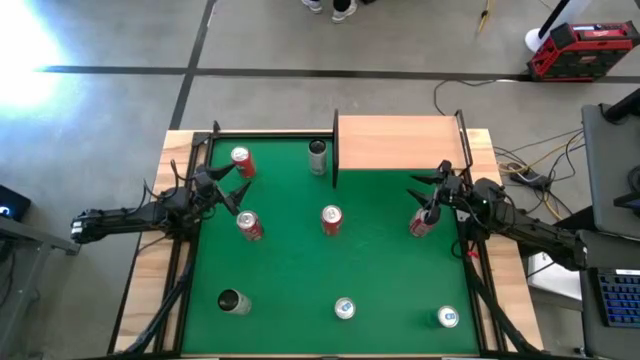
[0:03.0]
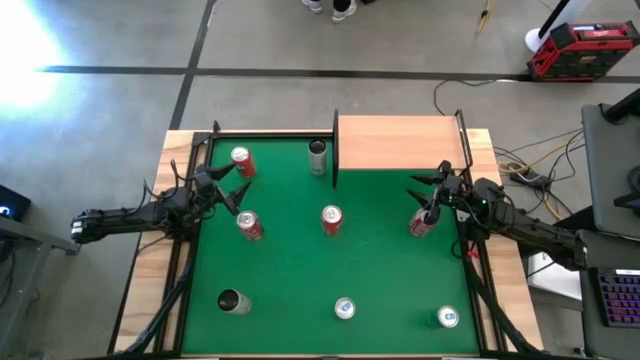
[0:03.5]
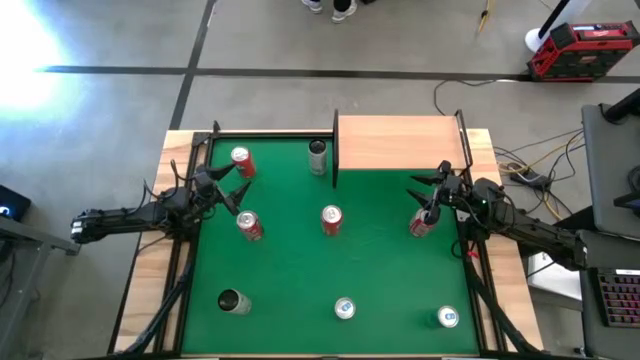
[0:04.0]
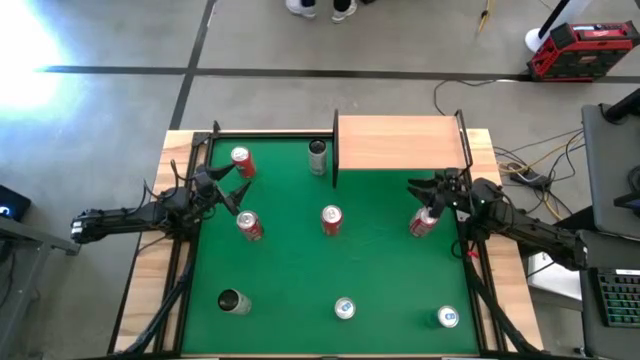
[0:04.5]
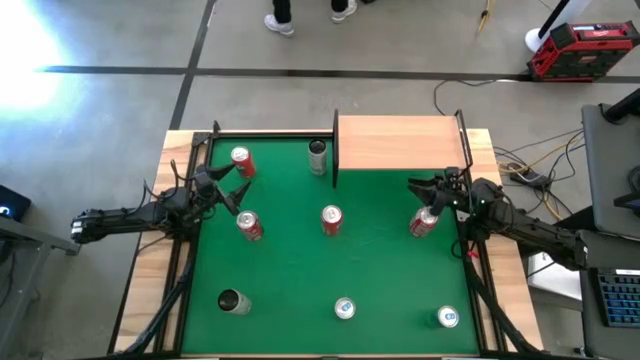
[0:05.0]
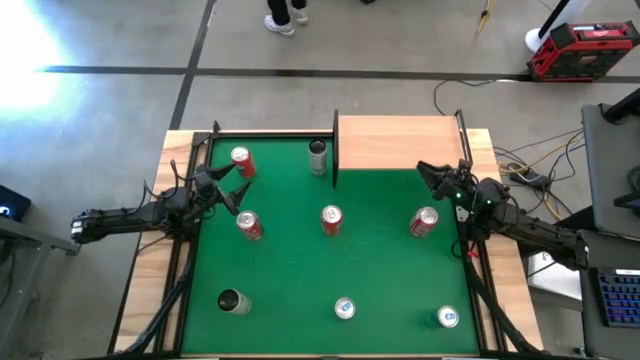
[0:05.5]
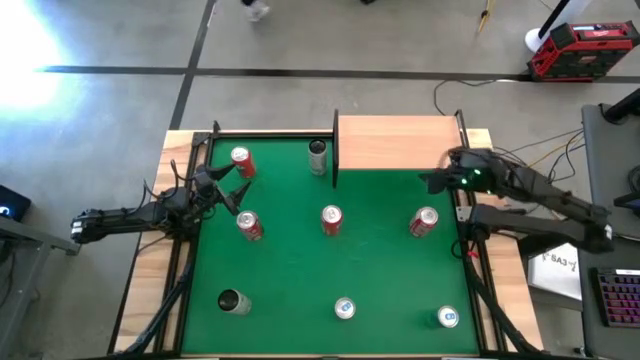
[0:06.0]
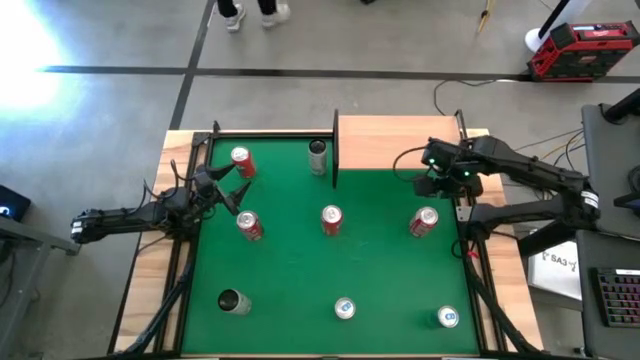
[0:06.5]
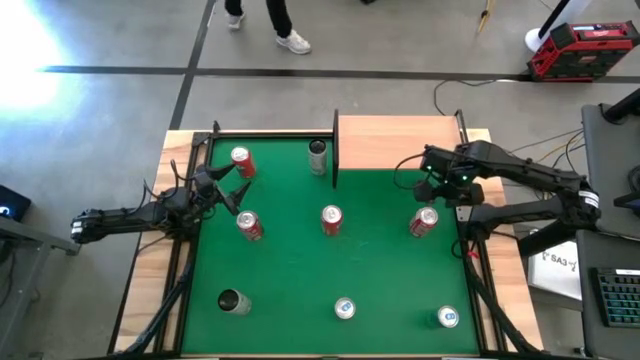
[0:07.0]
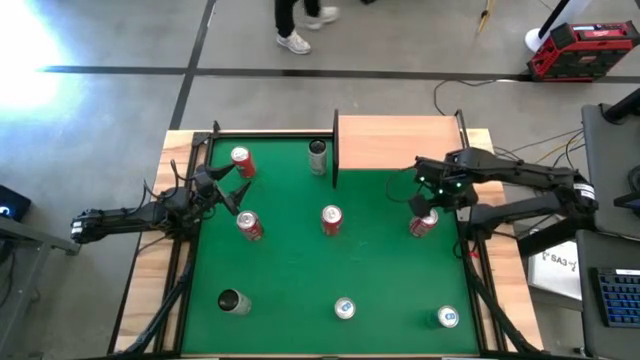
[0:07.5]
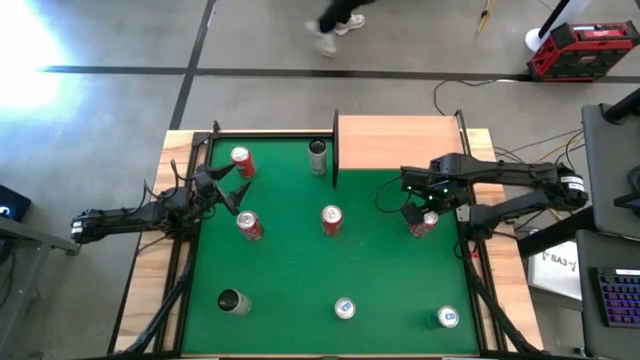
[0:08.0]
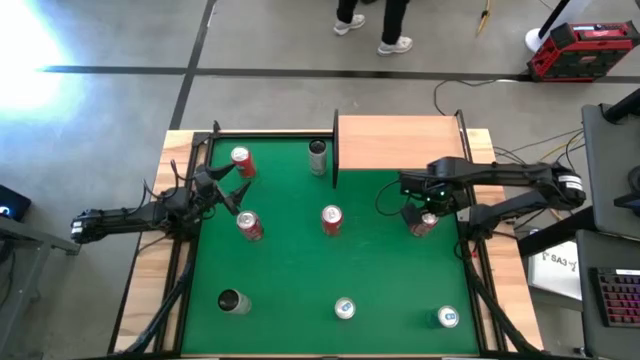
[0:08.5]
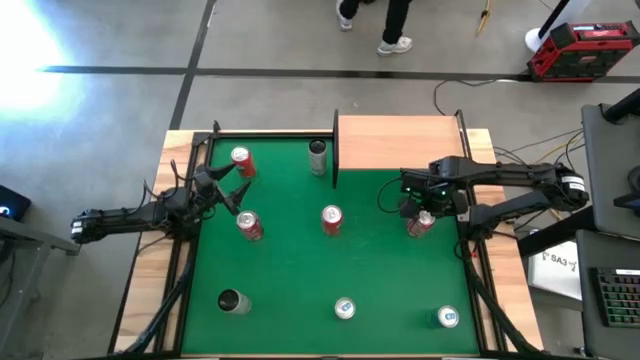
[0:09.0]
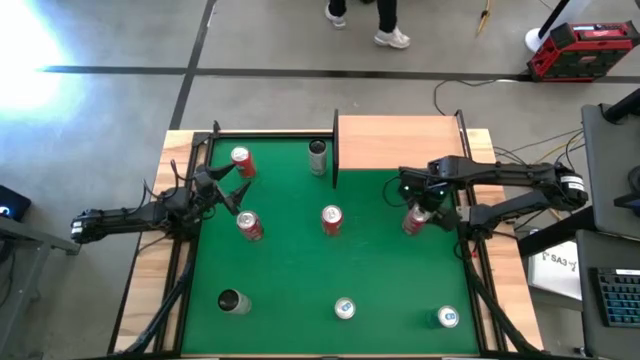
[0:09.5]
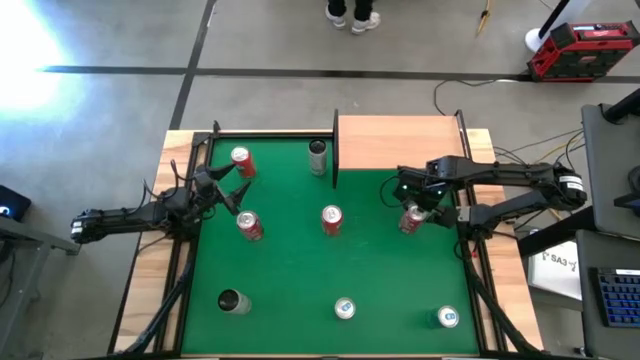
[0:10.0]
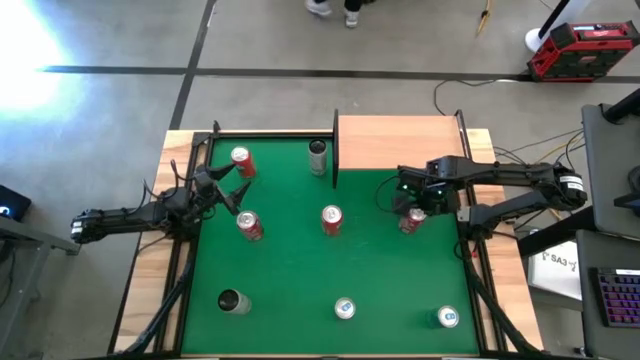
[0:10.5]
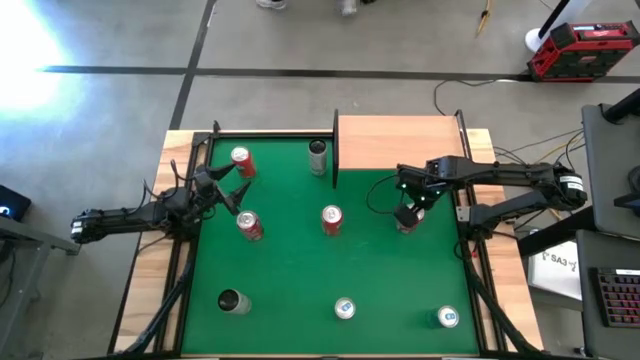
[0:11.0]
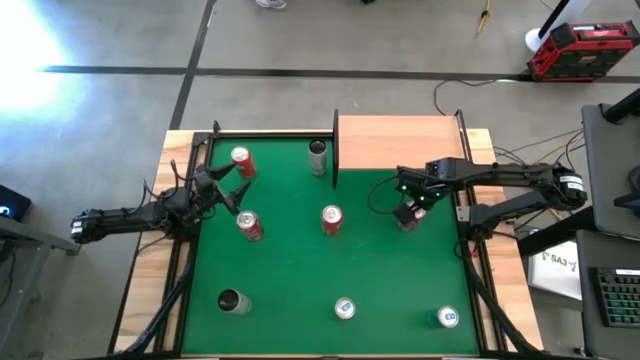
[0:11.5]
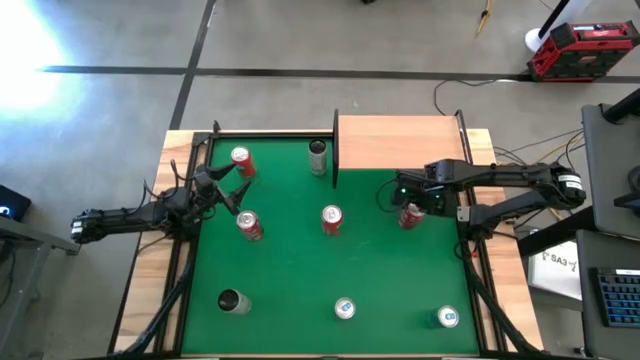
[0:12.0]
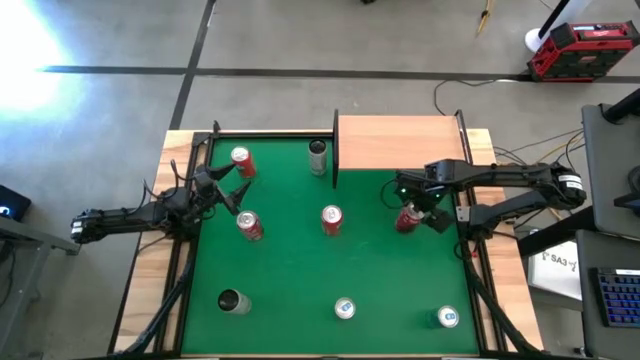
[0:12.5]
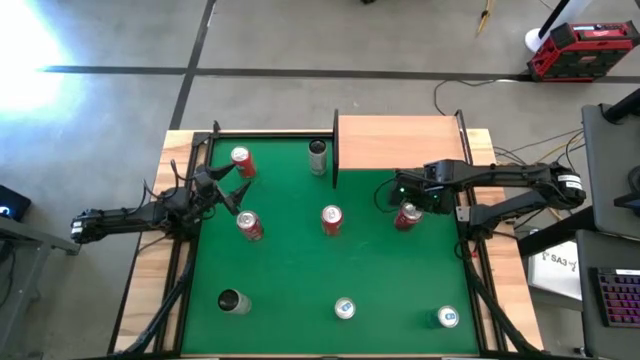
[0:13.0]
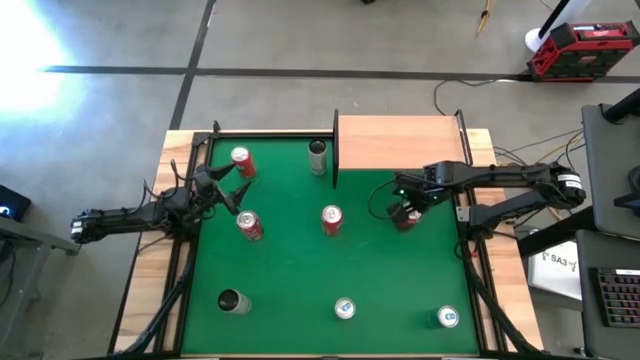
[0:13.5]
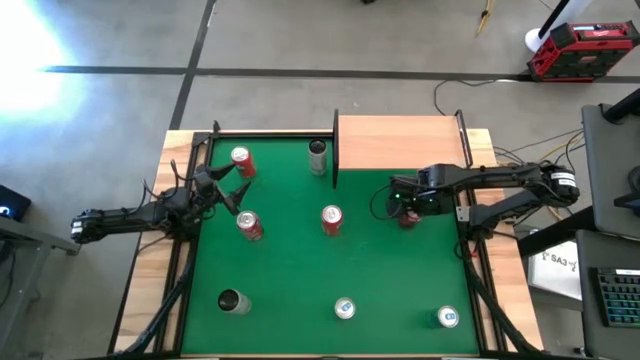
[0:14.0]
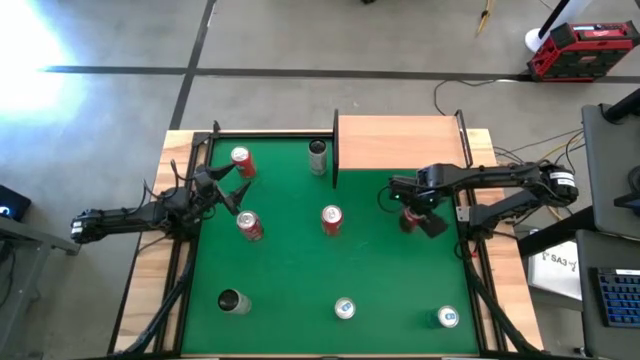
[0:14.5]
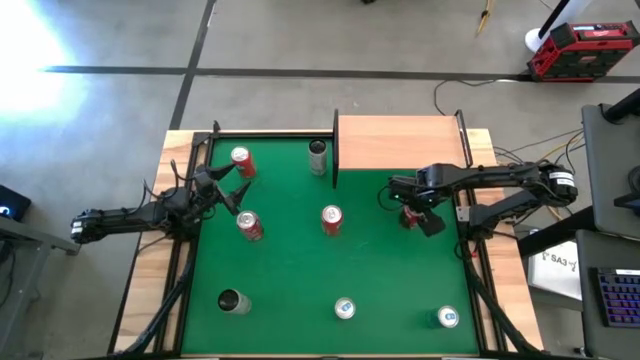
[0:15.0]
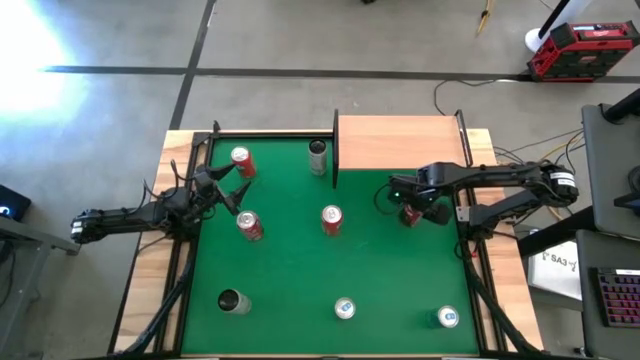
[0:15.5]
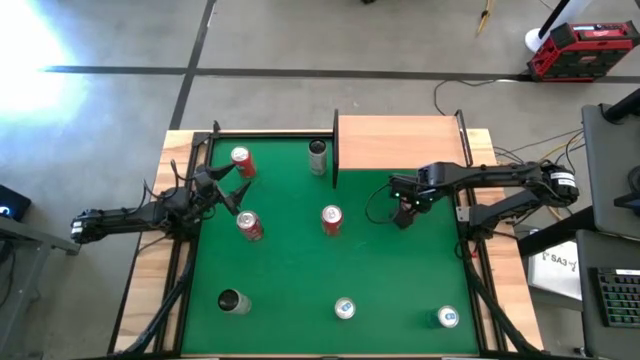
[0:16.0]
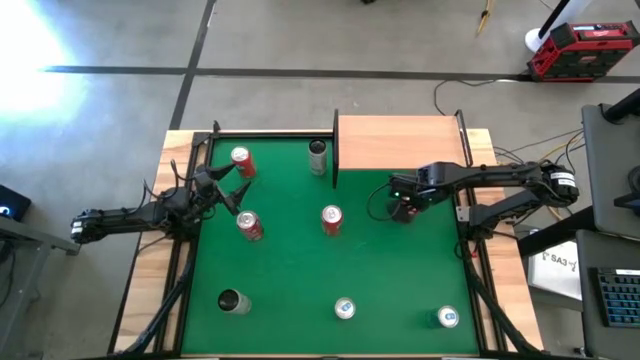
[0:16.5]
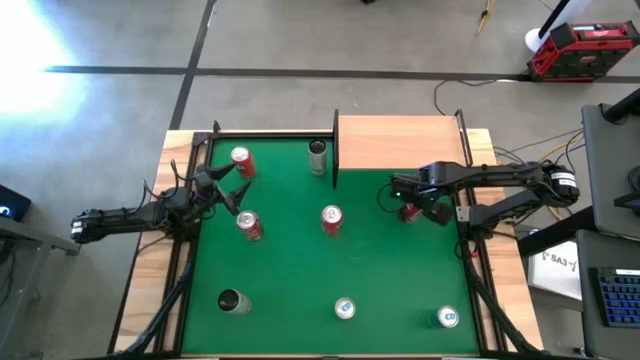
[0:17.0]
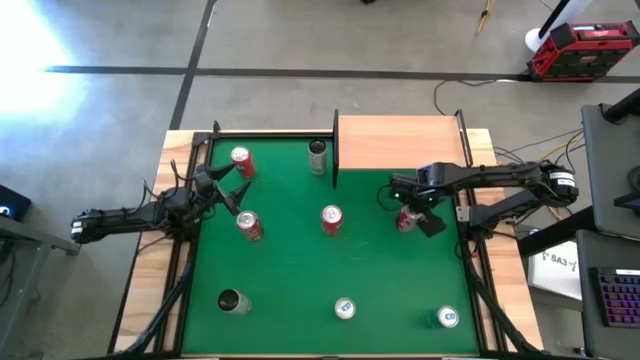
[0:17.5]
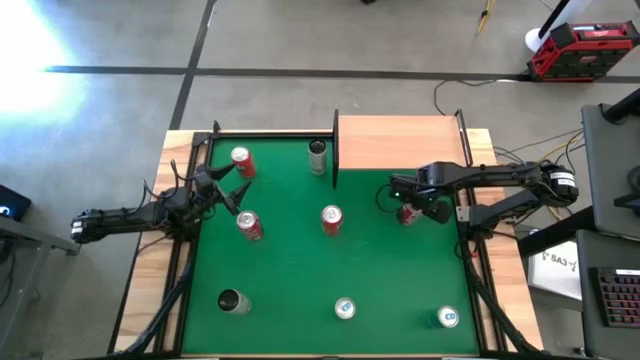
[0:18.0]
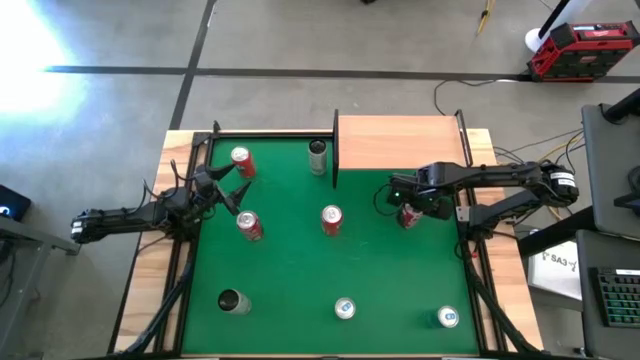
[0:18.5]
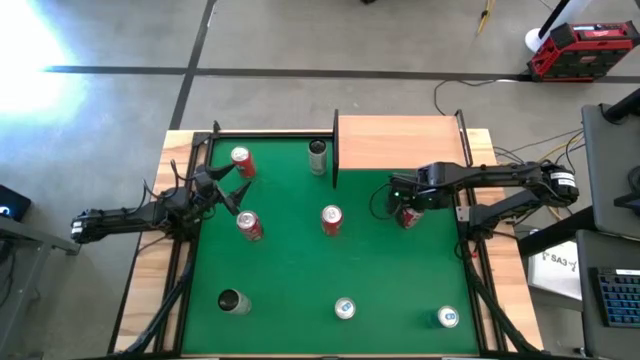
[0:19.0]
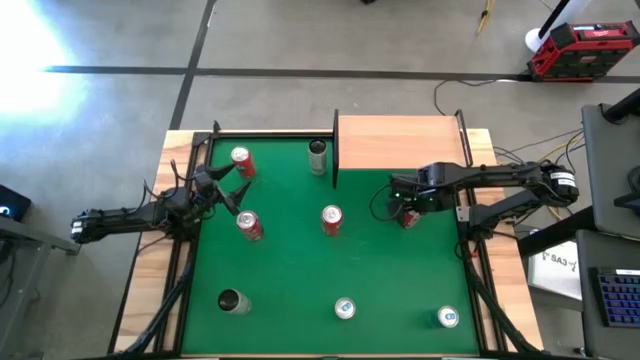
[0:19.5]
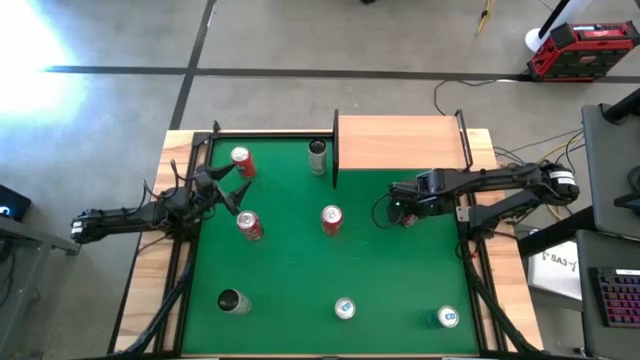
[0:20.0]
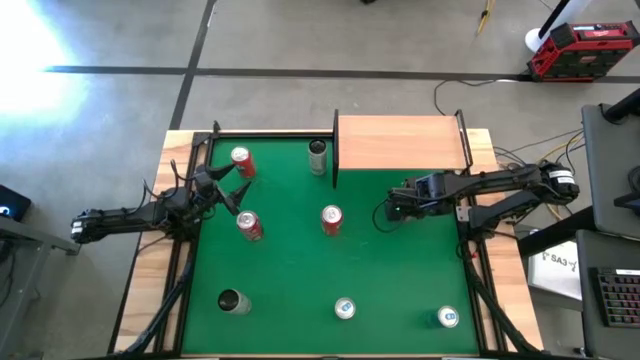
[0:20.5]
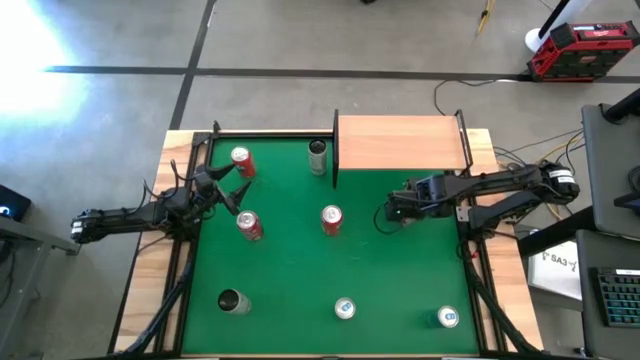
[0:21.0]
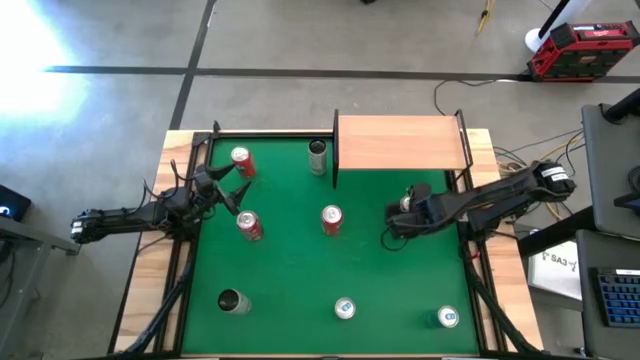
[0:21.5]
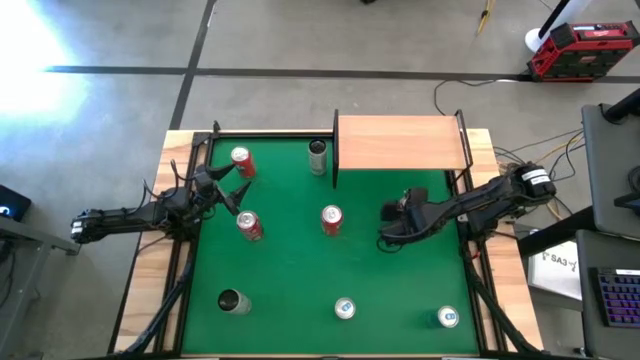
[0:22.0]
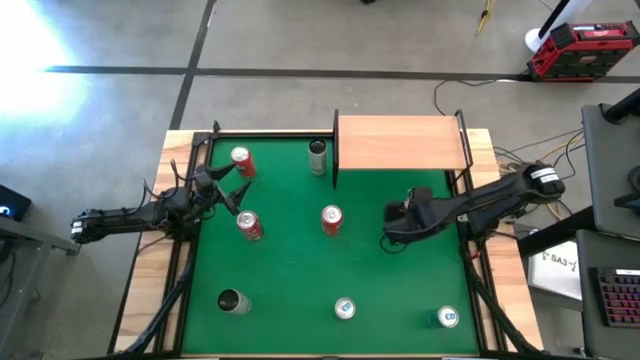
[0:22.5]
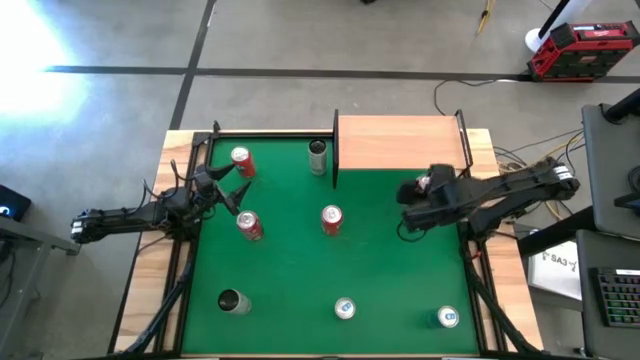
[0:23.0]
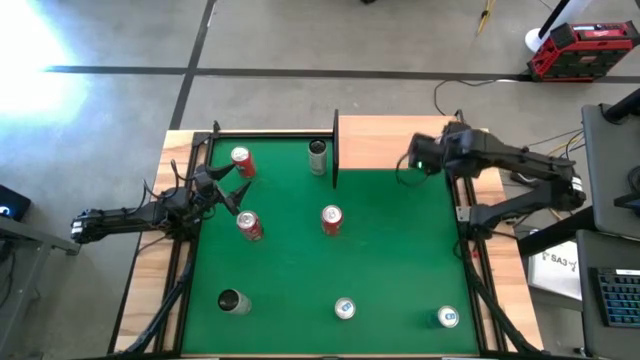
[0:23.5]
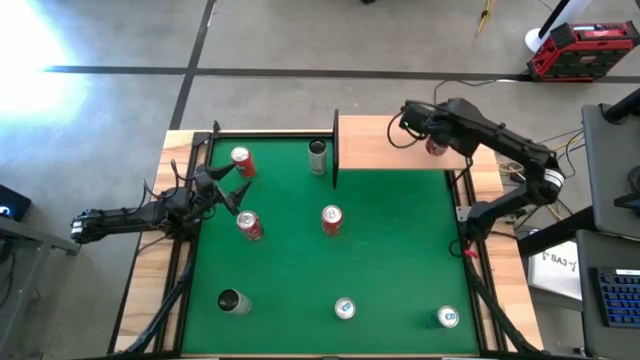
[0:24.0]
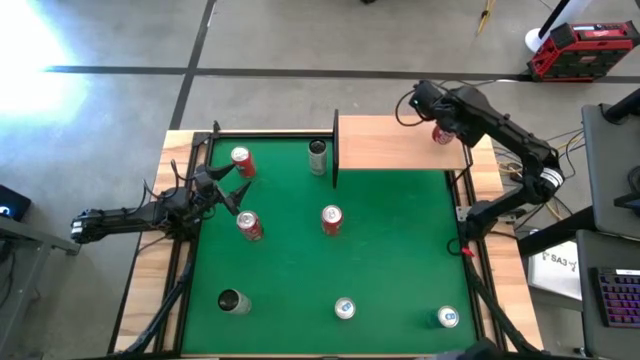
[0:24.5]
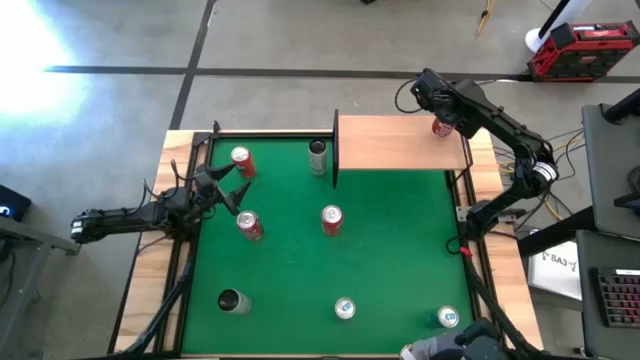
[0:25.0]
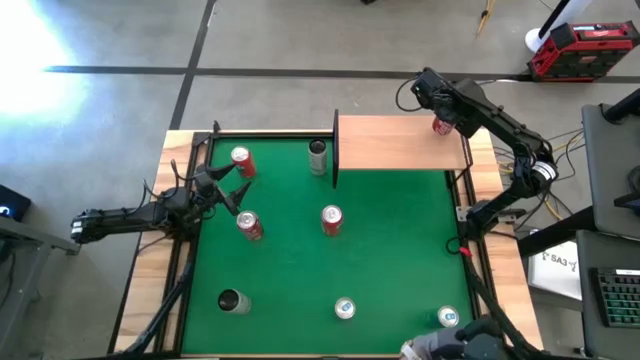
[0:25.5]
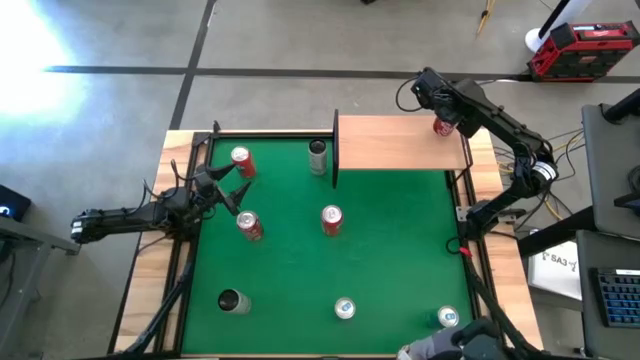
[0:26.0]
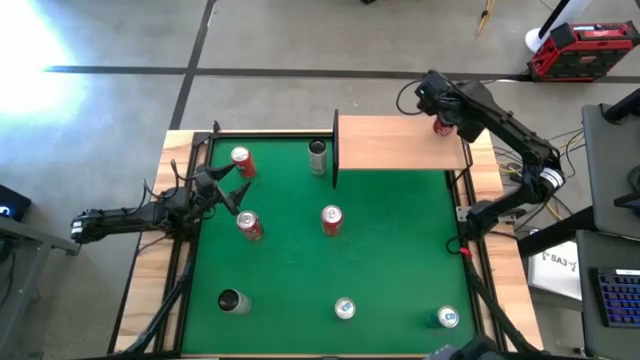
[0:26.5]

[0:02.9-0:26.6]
Task: Place canned beverage on shelf
Put the red-white soda can on the shelf
